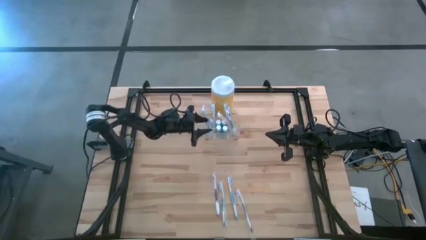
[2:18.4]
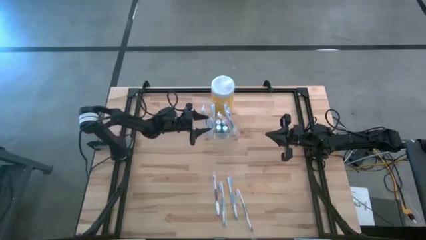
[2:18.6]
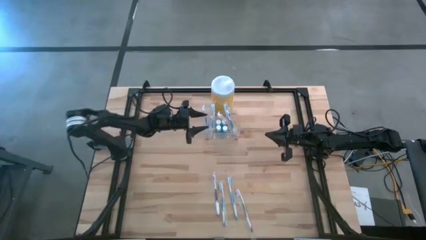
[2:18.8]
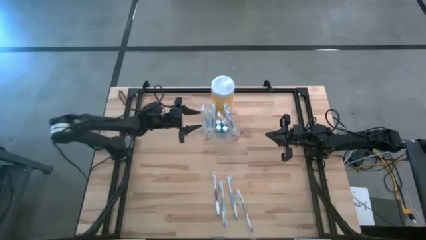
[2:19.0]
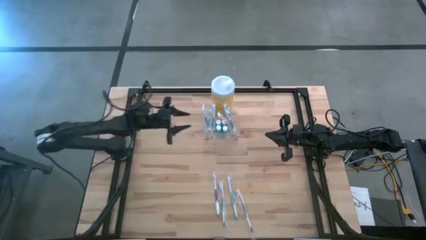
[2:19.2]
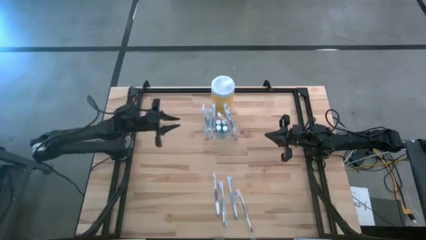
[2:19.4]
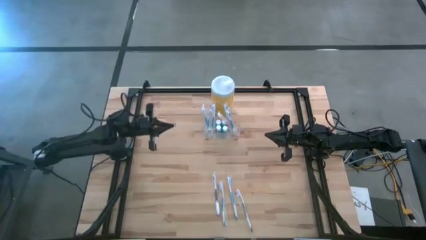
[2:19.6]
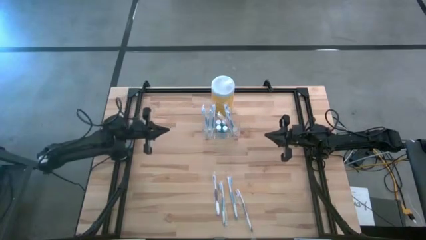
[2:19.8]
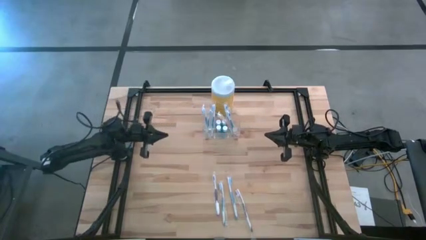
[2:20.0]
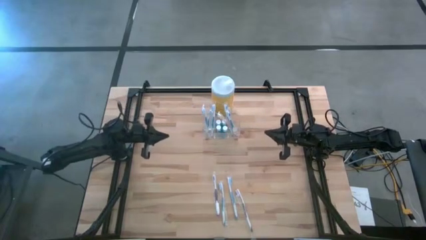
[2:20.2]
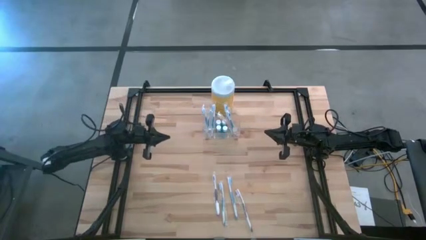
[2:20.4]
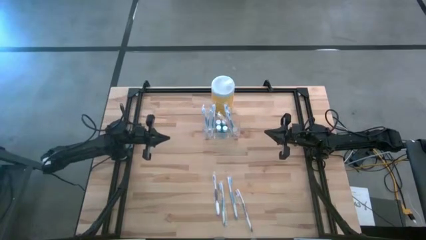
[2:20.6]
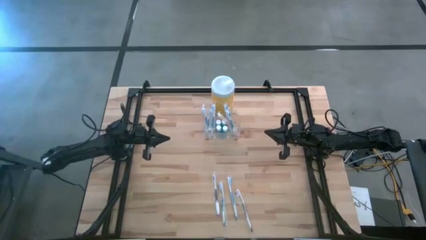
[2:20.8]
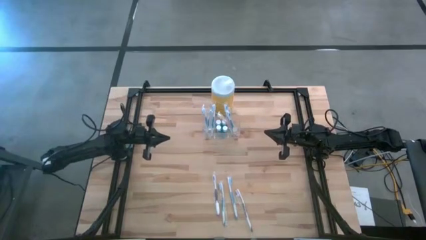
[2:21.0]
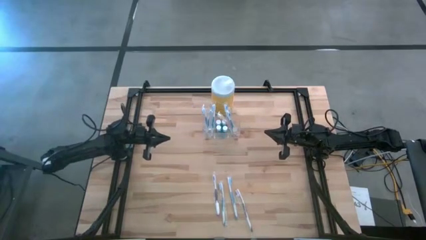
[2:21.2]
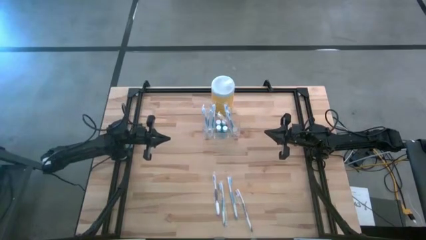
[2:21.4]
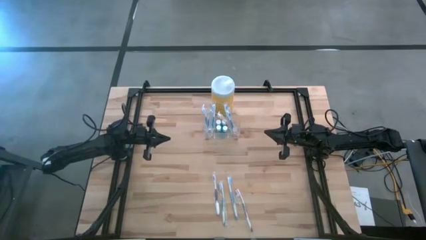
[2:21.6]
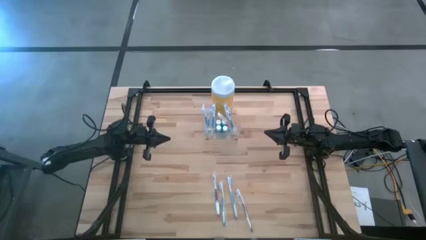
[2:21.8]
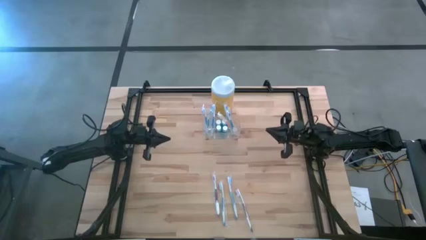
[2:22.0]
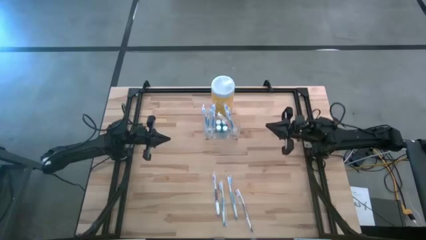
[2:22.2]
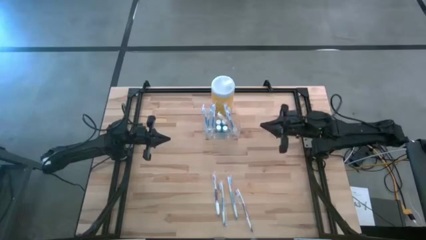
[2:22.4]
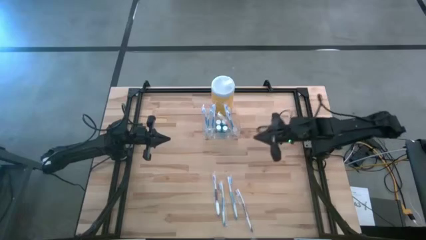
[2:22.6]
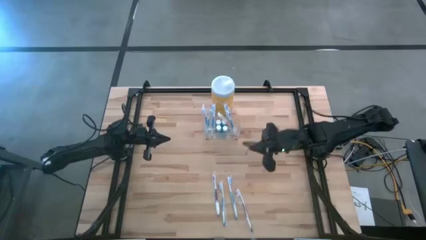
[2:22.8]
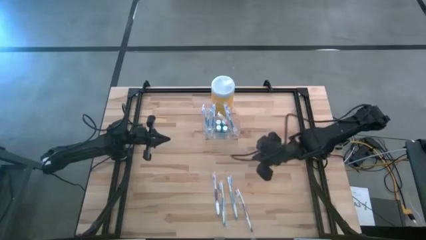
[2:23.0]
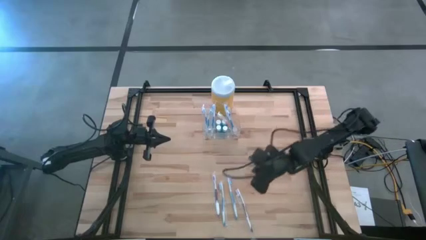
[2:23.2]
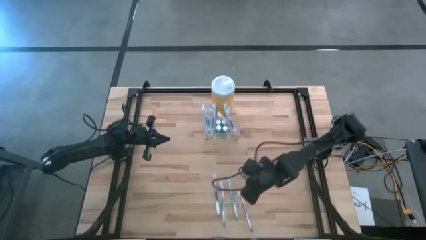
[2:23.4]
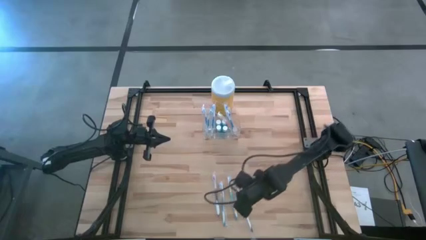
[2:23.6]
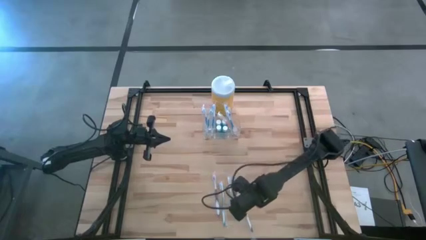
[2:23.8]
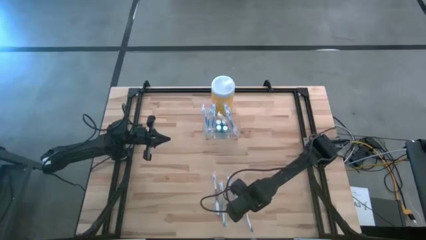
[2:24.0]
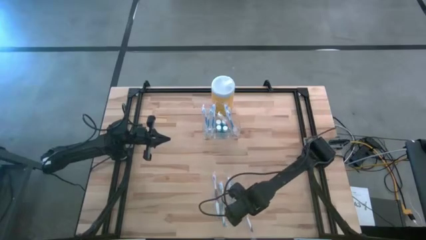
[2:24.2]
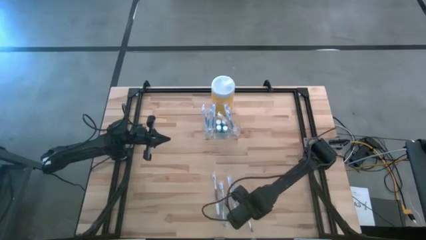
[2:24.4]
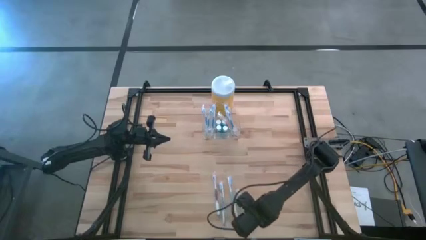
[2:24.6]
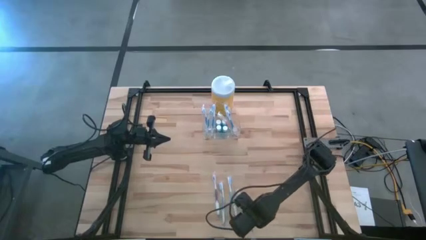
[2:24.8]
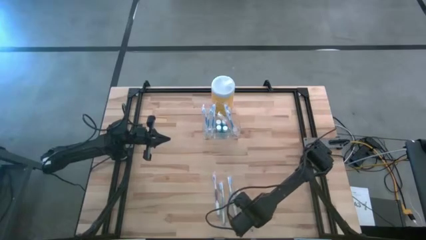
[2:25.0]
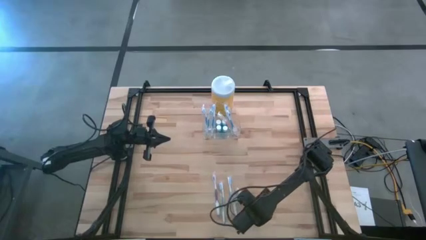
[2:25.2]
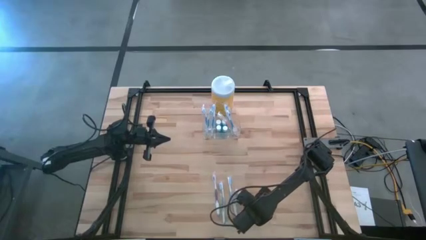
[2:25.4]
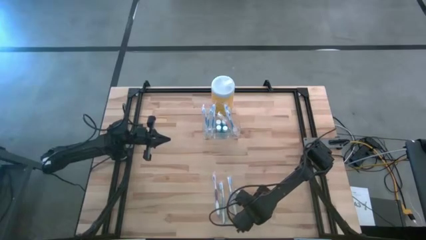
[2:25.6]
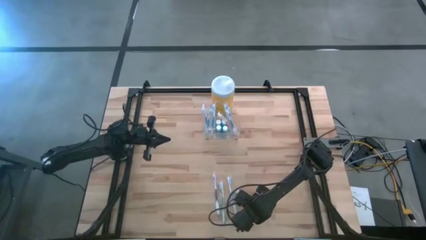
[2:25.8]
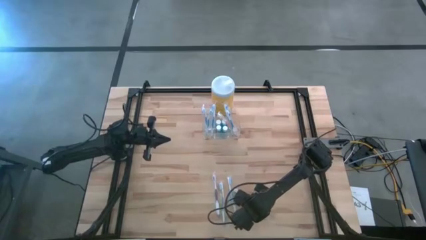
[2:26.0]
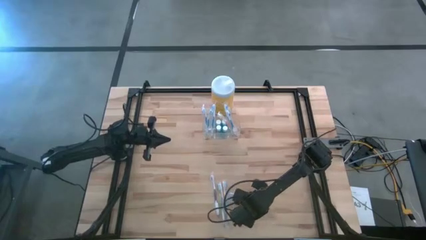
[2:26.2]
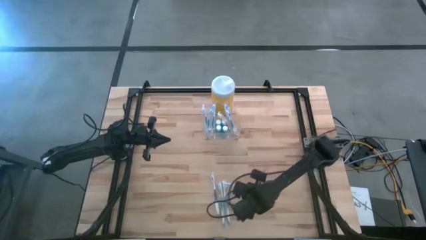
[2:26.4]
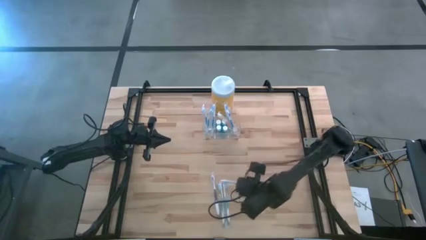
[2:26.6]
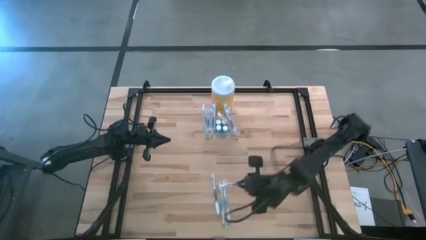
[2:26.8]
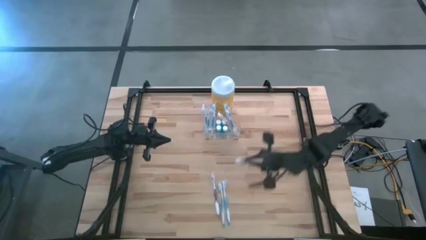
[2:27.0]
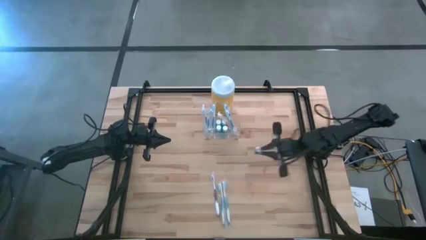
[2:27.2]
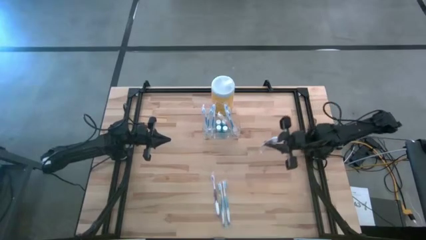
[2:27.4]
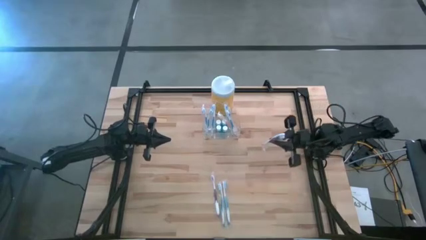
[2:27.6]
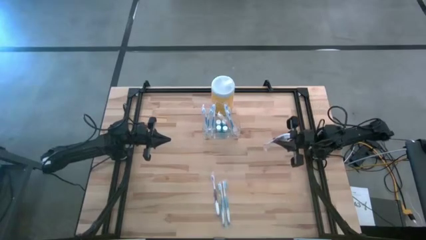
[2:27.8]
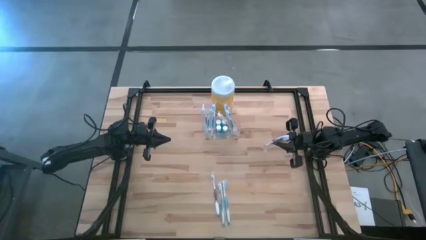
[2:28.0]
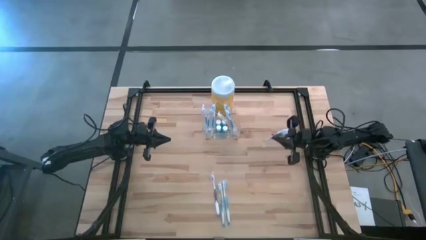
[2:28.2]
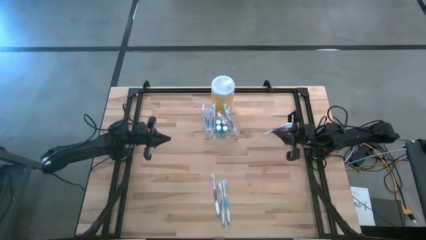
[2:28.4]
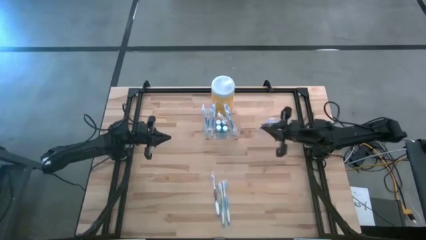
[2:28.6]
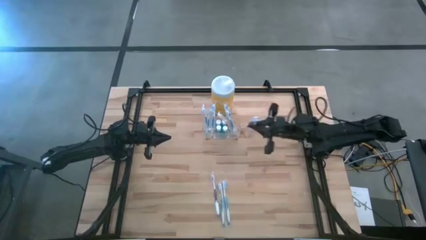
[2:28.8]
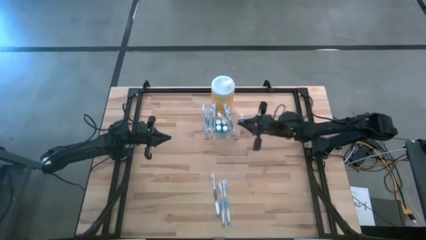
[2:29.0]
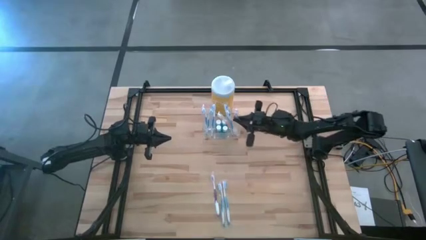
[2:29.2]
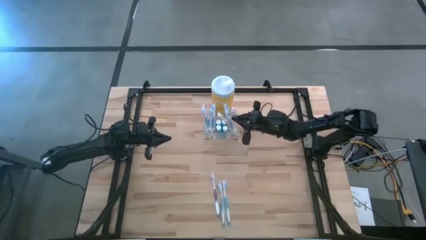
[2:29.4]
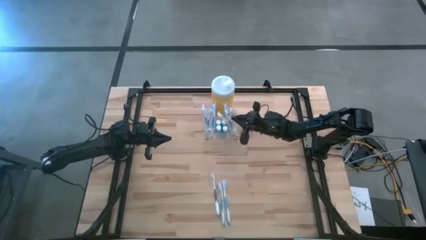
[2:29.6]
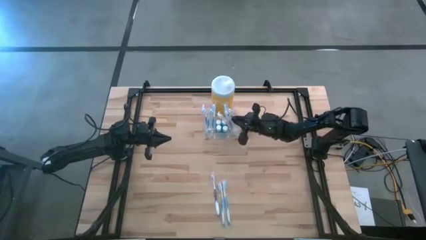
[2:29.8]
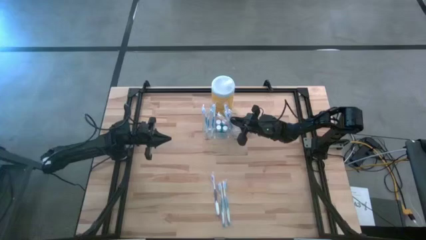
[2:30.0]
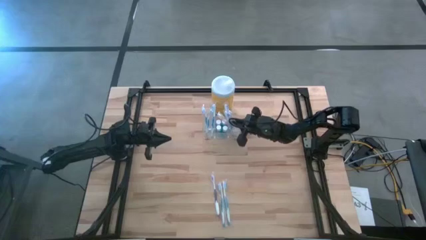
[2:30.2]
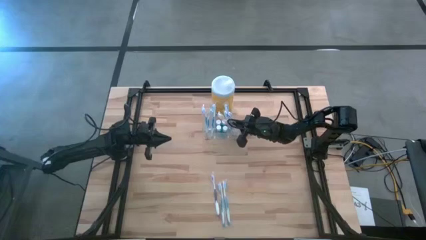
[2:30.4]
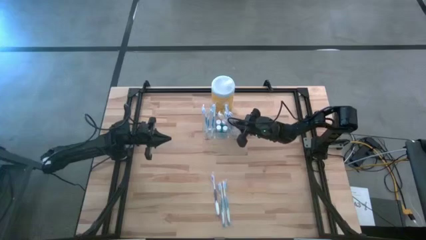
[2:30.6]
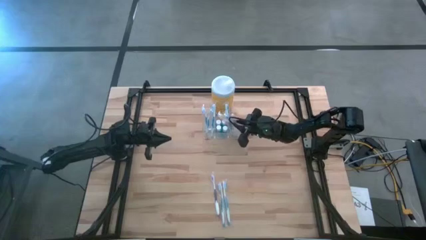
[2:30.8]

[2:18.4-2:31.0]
Task: Pick & Place toothbrushing station
Put the violet toothbrush into the transparent organizer

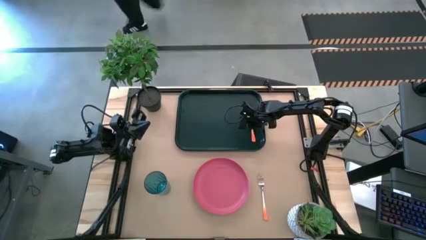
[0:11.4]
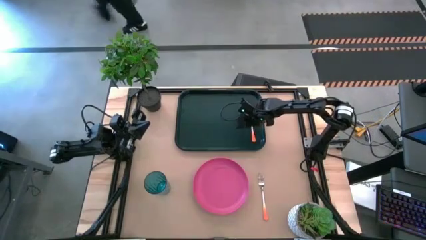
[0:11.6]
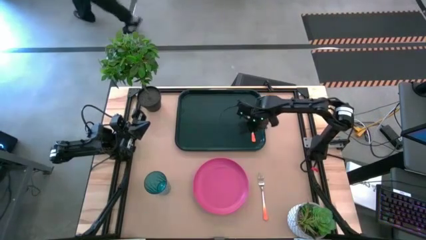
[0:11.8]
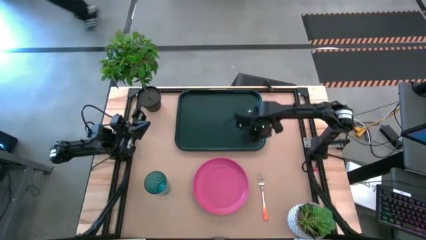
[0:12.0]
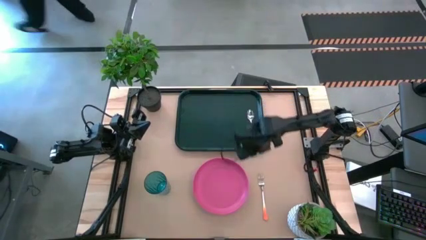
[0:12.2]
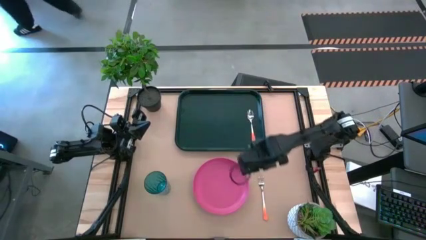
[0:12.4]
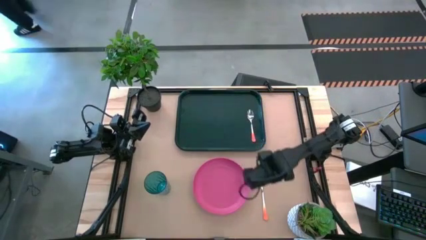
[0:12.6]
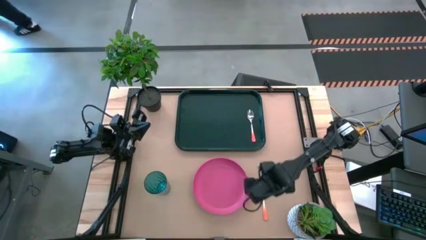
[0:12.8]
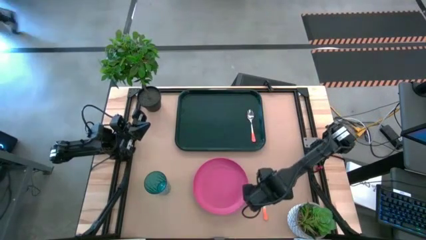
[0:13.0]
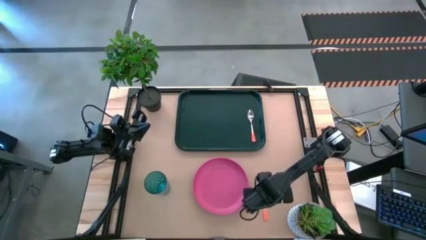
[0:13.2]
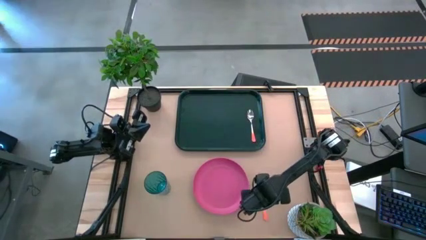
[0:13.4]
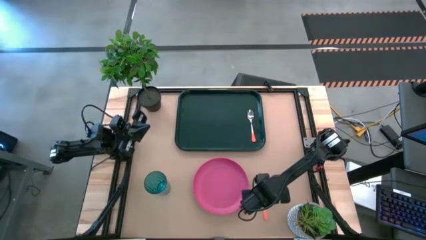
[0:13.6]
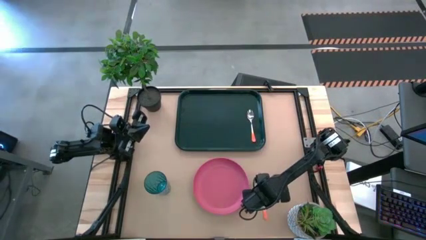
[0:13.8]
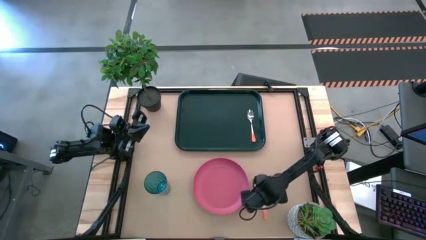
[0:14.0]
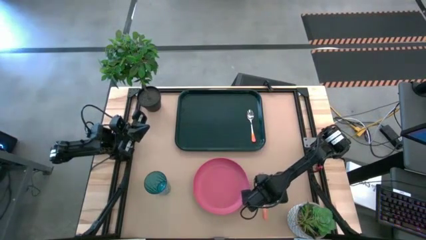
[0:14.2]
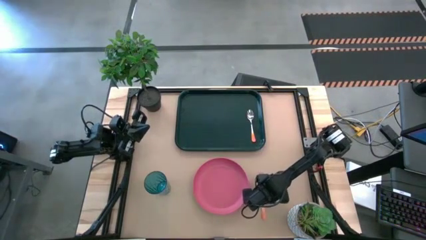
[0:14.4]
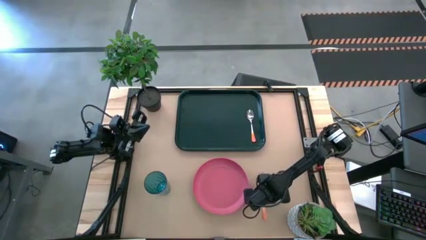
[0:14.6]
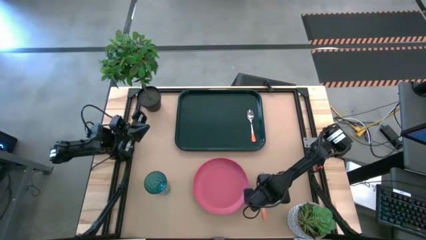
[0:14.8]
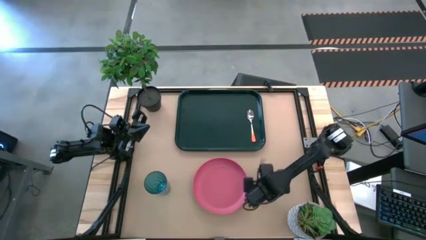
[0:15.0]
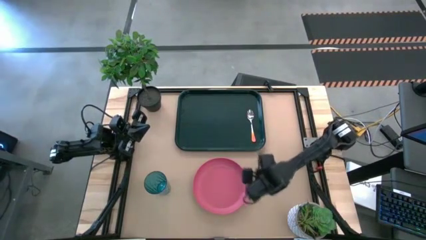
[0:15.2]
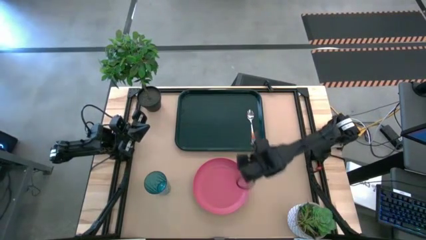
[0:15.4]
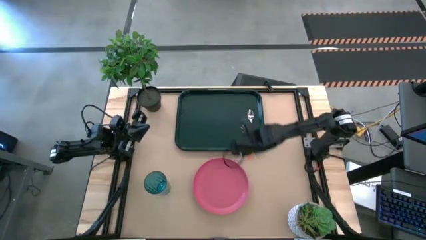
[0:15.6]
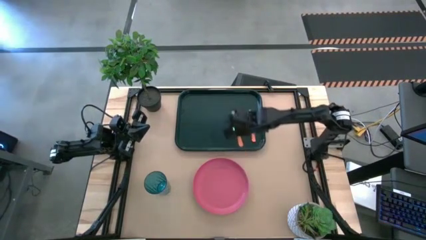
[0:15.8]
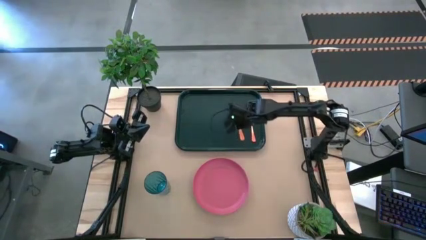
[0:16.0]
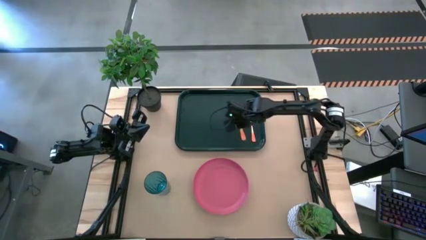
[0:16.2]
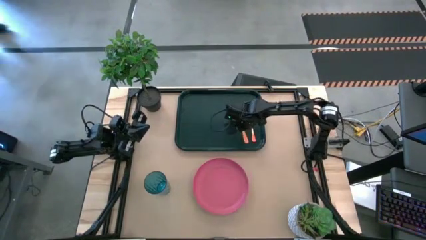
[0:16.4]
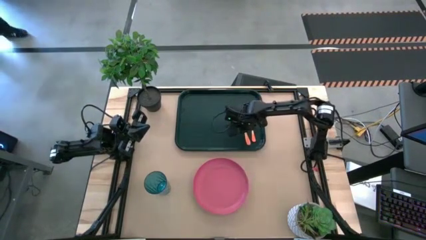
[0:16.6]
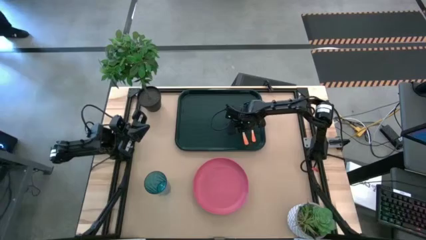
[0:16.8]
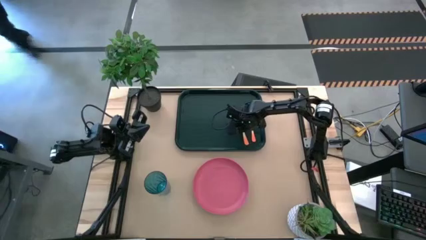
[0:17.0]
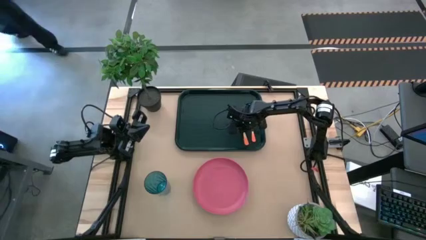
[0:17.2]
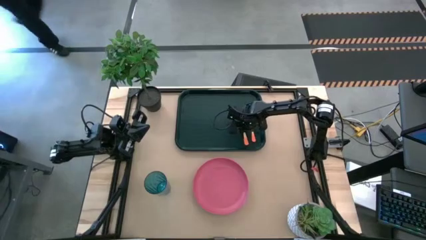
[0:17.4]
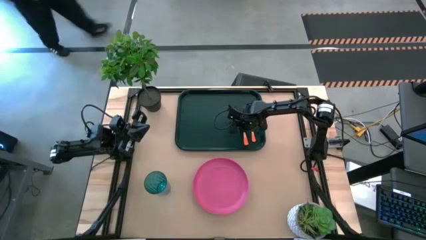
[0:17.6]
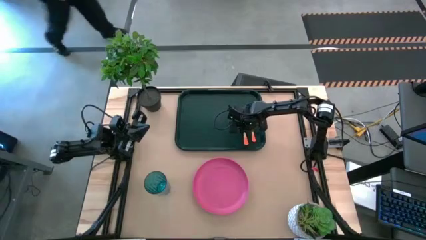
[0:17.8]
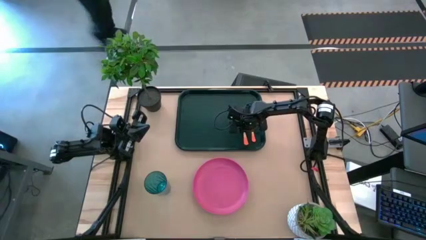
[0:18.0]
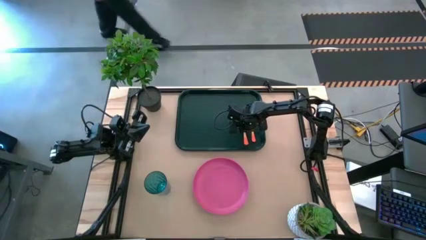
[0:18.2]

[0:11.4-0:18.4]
Task: Pick and place plate/cup/fork/spoon on tray
Put the orange fork on the green tray to the left of the orange spoon
